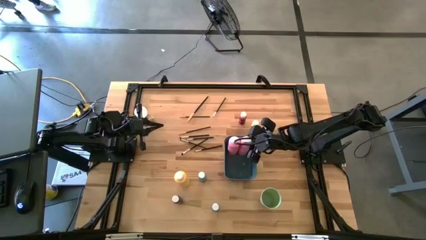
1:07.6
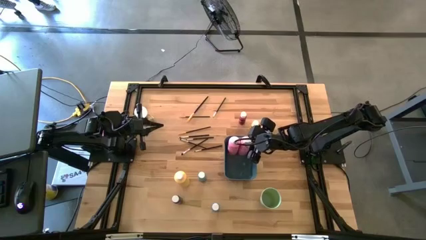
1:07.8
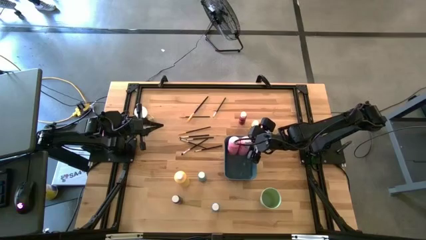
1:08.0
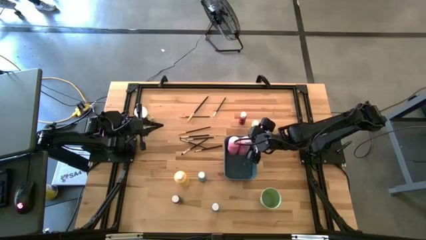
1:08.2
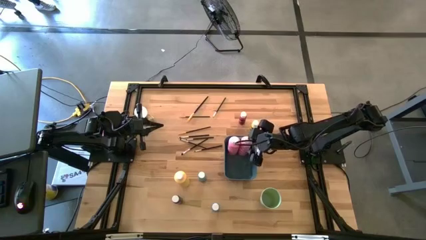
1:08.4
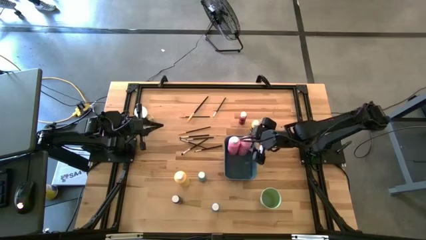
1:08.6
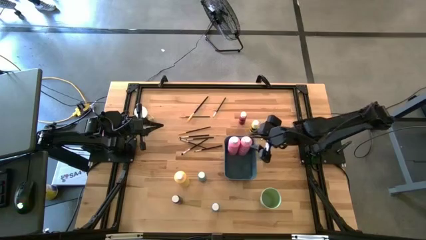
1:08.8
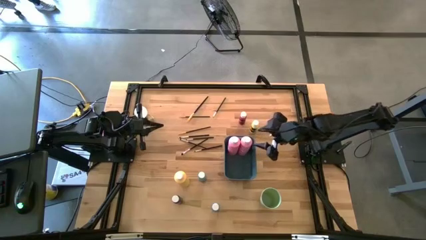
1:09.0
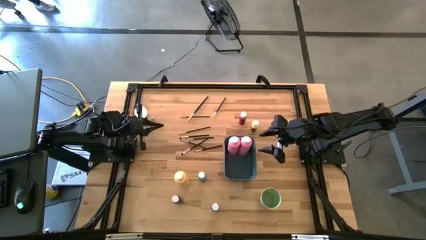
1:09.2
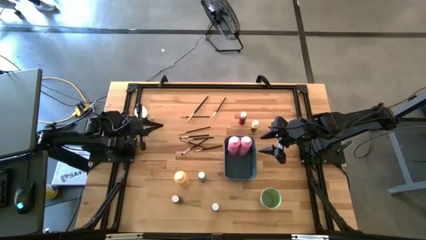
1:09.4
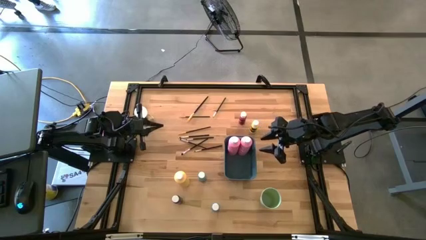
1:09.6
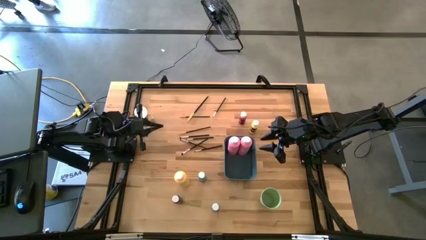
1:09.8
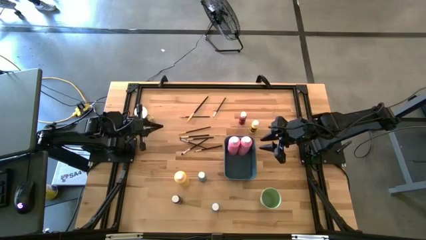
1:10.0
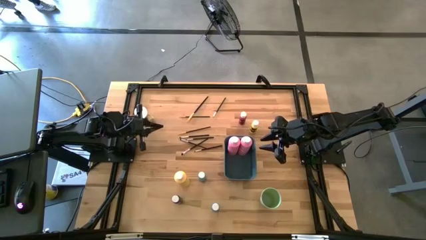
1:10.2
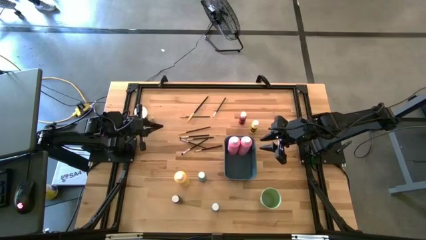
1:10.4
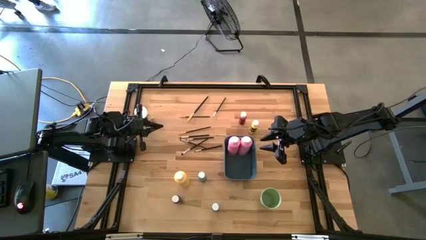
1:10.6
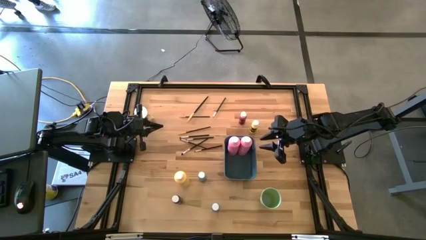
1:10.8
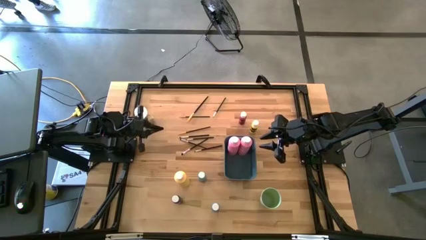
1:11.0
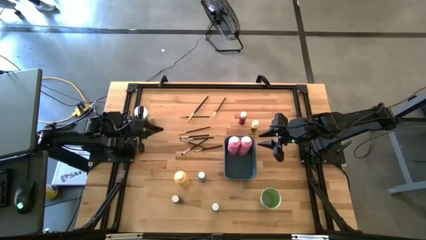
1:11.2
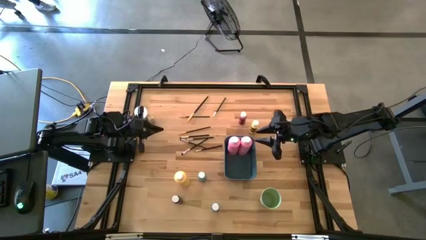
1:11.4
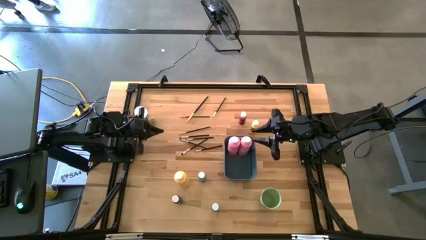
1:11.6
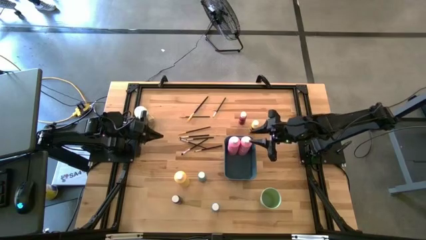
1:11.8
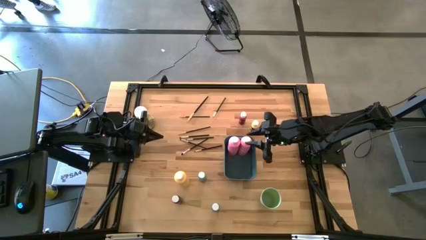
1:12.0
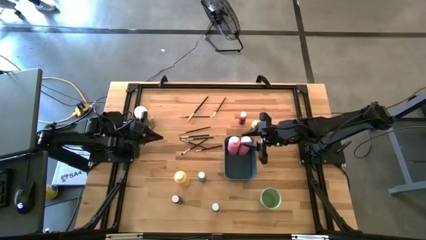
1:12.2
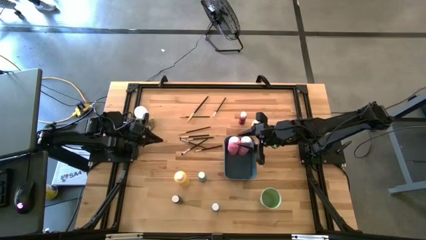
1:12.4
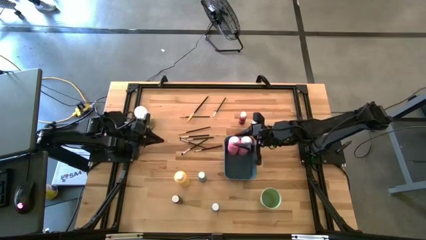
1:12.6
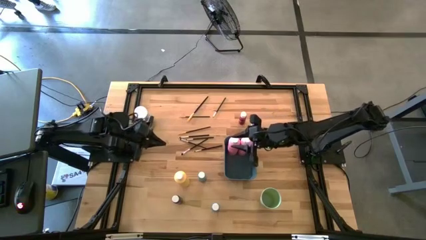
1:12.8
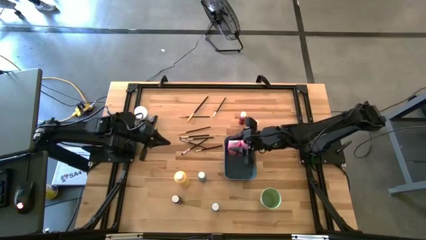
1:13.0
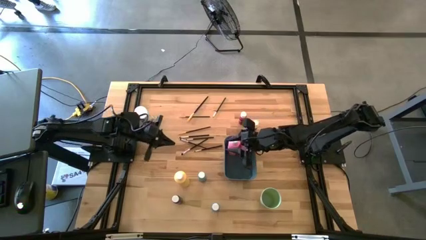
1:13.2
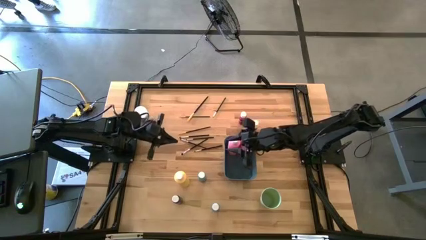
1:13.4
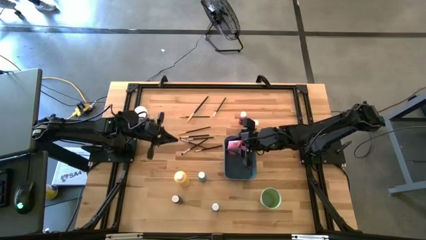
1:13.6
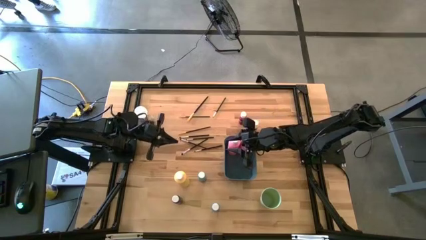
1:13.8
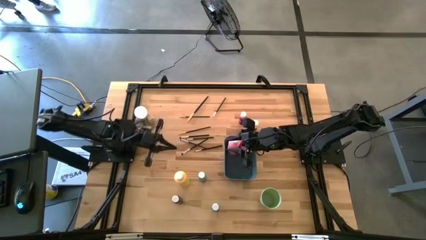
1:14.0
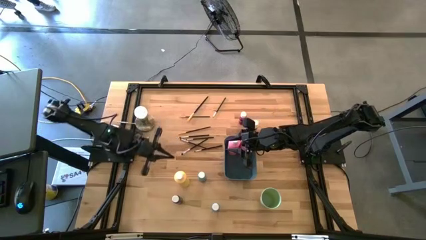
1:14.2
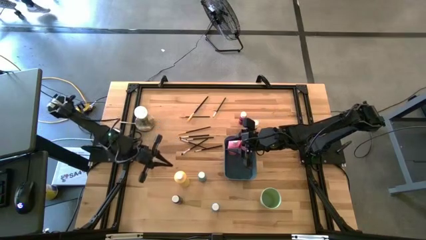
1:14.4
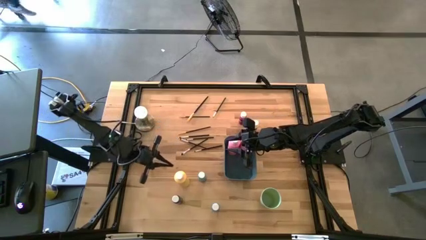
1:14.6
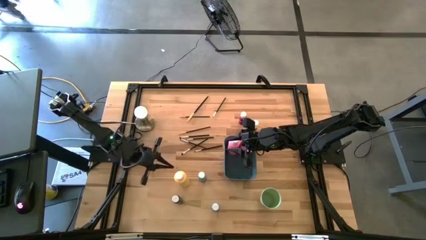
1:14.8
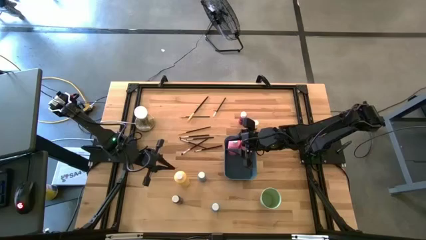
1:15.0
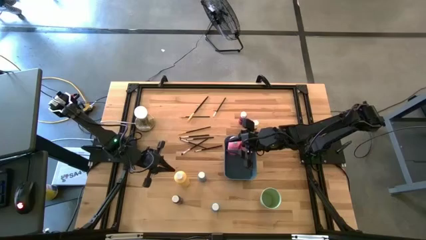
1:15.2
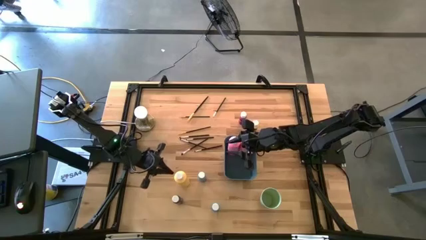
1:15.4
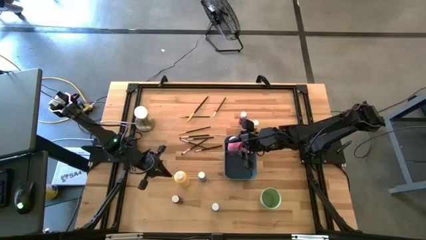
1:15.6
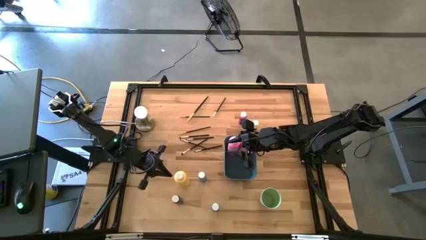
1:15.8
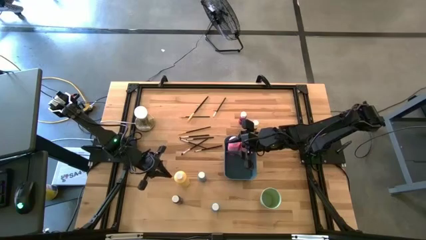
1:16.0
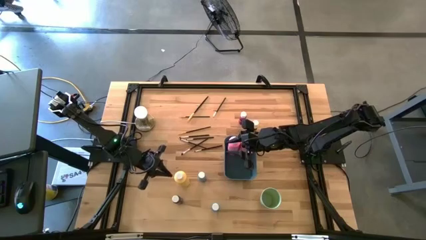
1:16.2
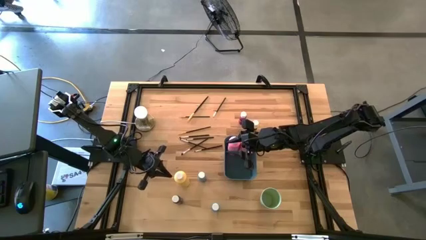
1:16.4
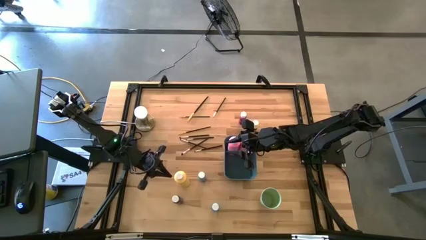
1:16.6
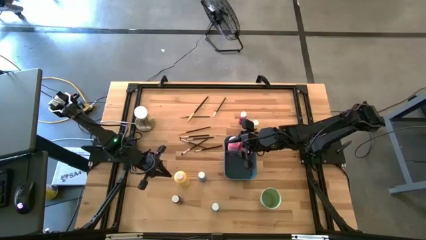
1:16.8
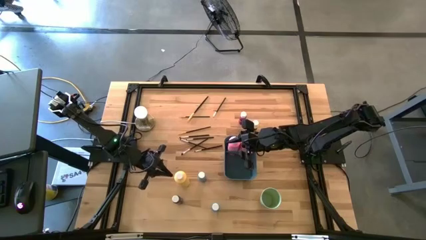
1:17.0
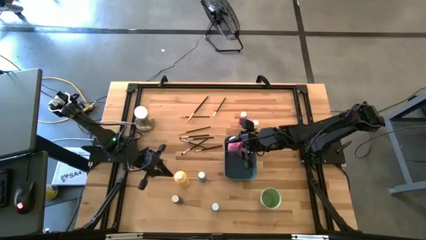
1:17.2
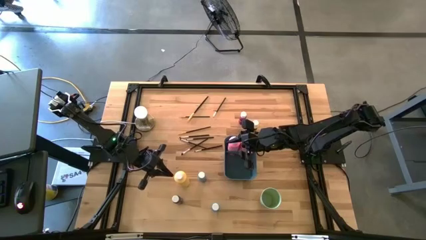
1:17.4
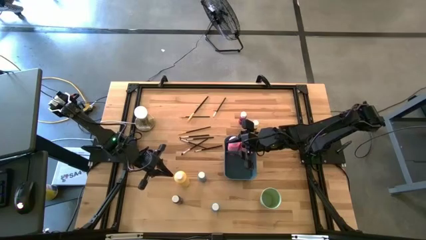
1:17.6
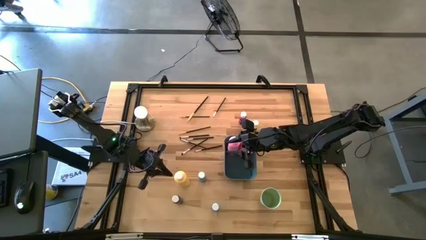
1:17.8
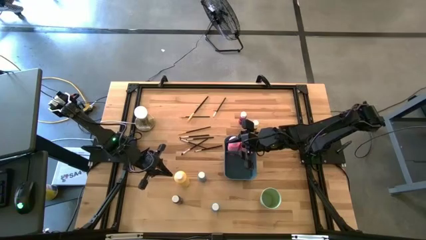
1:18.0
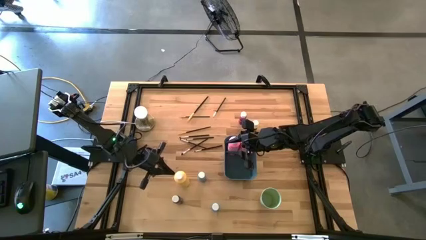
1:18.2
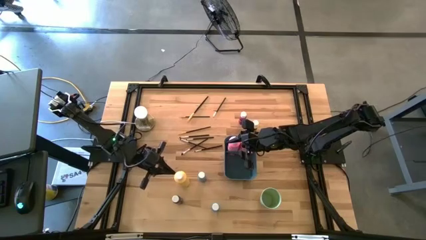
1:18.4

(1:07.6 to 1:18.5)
Task: Pick & Place Paint Supplies
Move the small blue and black paint bottle to the center of the table

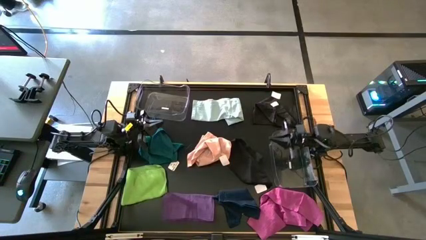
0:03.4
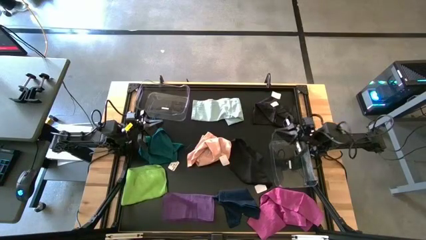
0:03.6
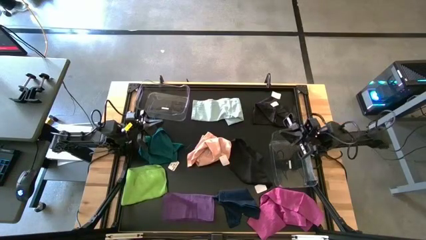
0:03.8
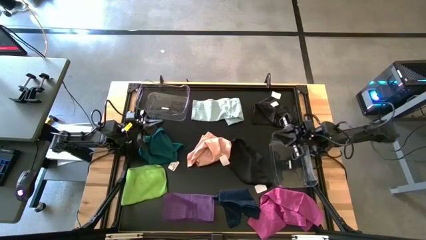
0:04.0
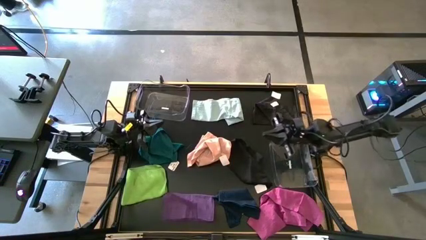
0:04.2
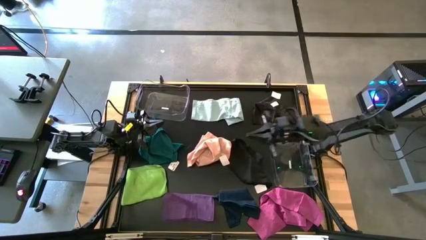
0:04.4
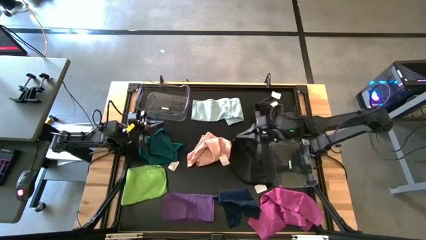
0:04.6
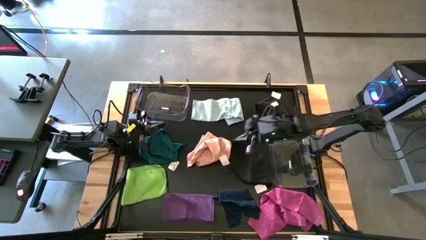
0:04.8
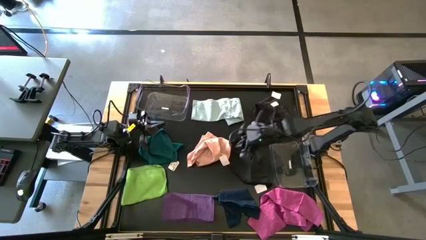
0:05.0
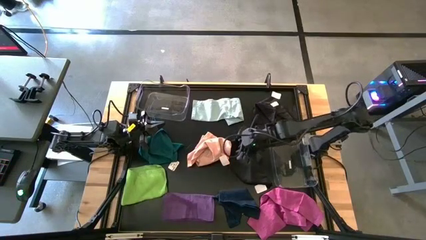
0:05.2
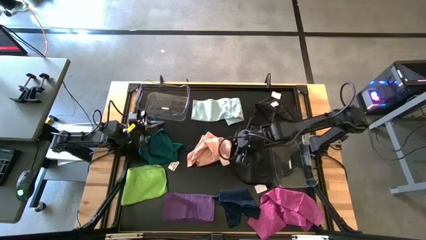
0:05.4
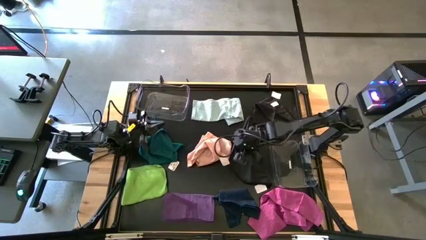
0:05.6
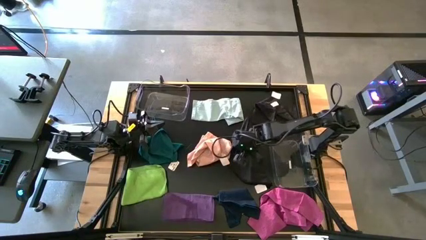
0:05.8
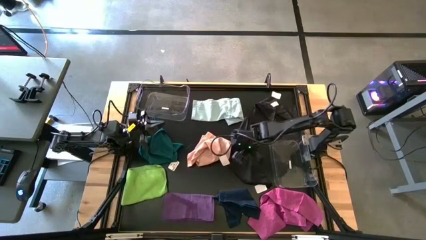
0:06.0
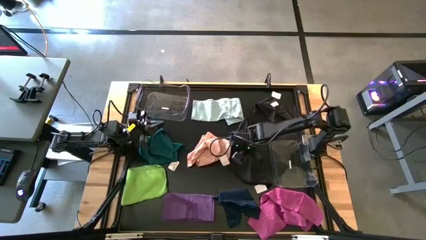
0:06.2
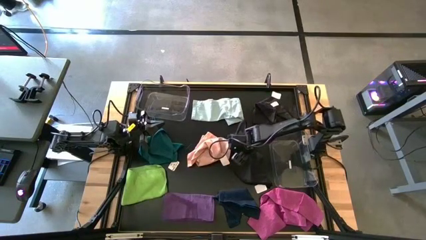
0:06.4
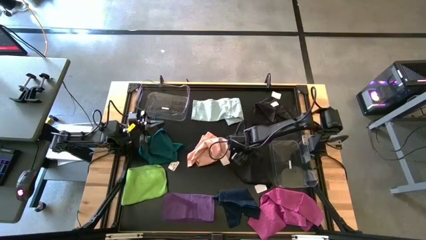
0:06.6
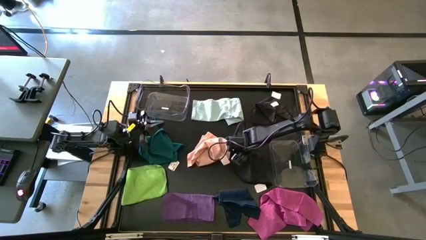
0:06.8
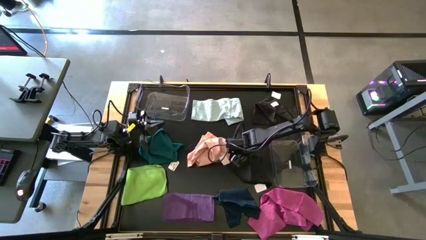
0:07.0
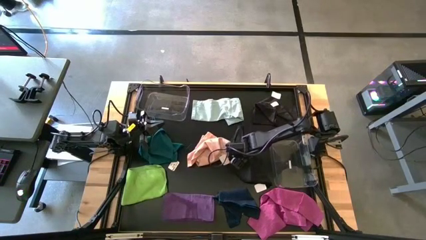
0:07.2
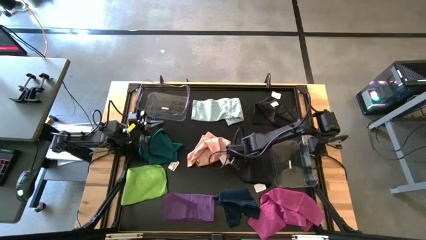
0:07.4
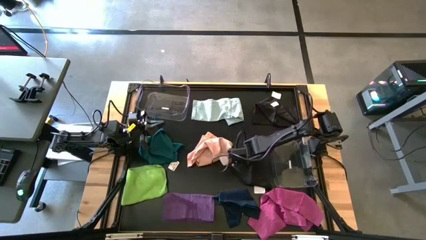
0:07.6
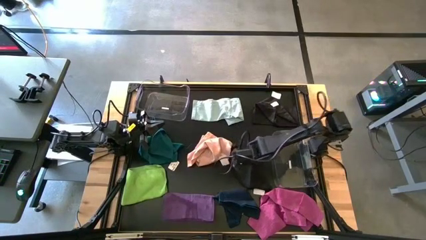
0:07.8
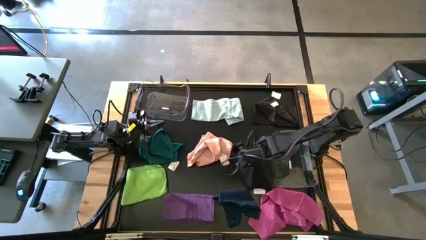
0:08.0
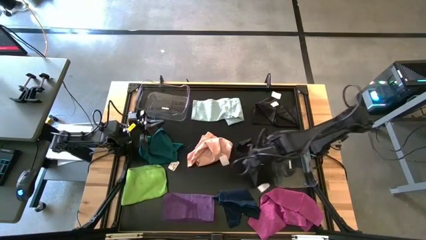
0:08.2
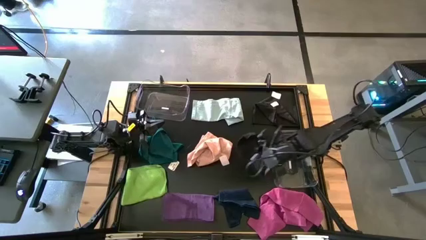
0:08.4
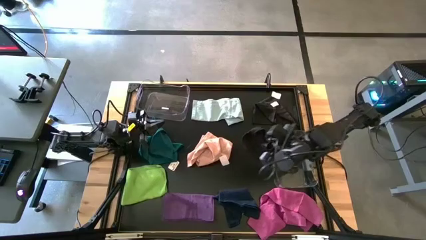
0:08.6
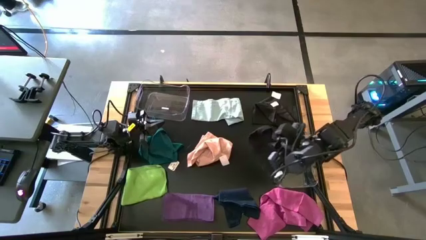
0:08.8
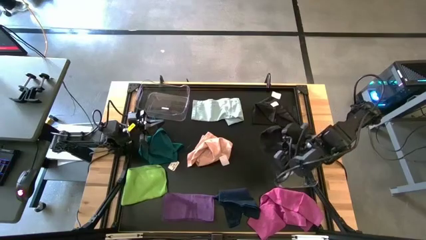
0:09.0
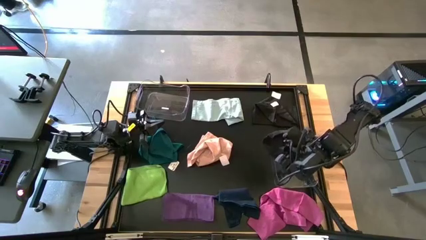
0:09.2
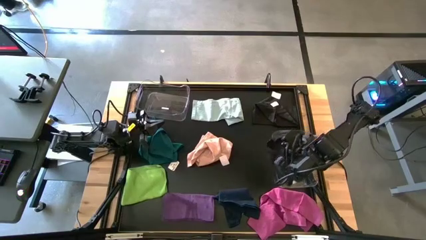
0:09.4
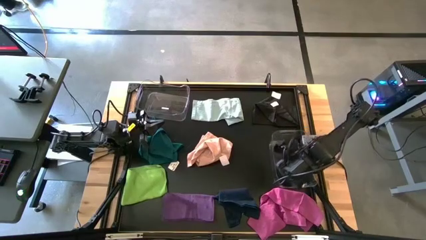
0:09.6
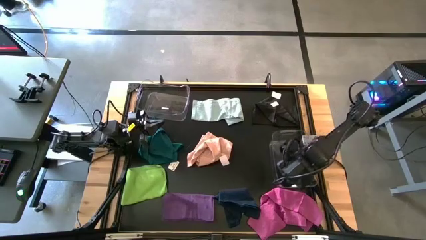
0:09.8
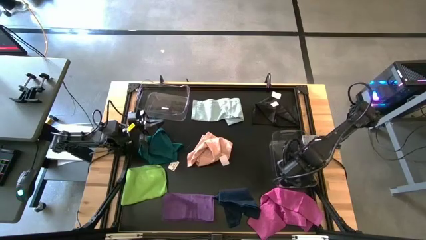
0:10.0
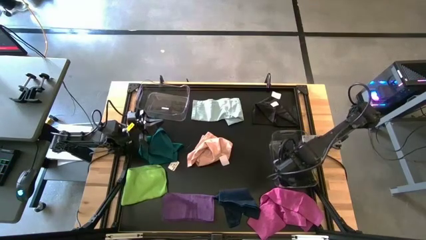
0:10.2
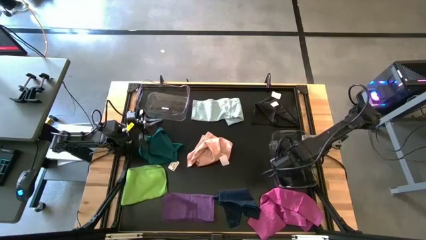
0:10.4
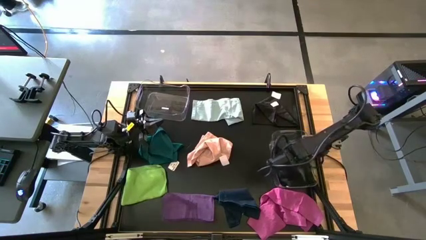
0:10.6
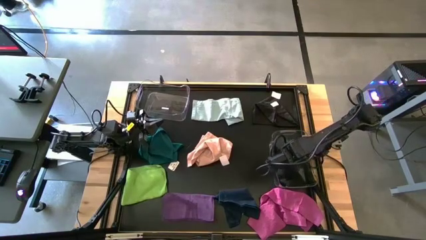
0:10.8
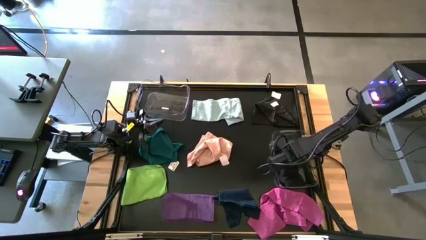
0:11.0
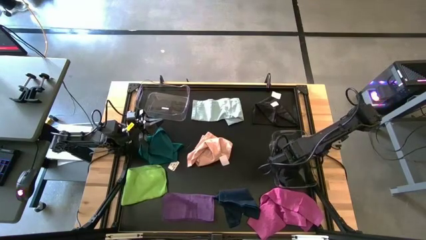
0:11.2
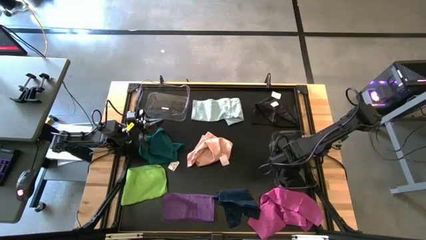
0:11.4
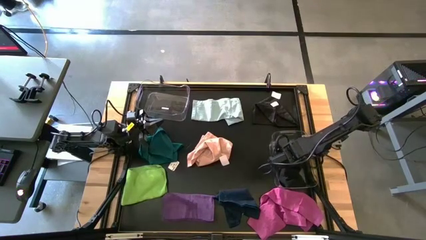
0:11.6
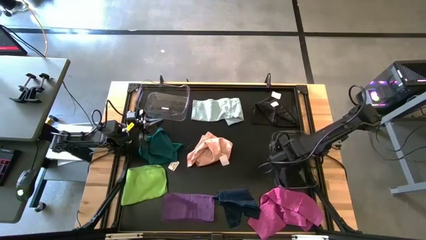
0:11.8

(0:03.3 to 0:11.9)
Task: Sort towels by color in basket
Put the bottom black towel into the bottom transparent bin
